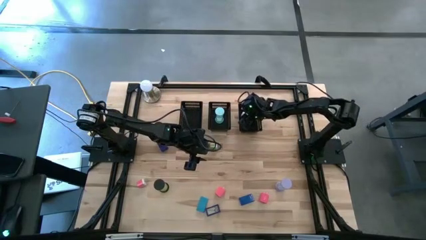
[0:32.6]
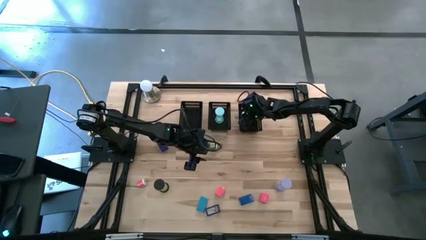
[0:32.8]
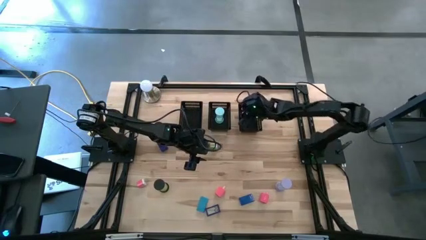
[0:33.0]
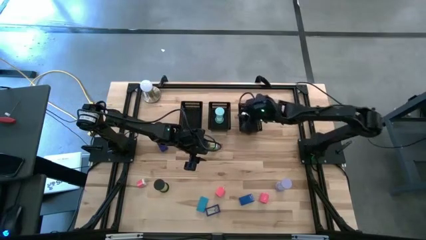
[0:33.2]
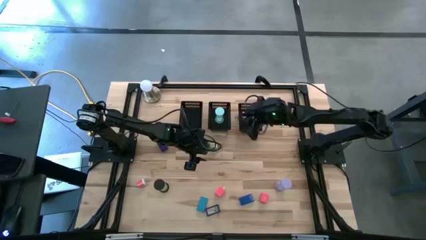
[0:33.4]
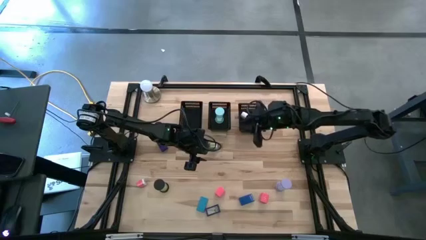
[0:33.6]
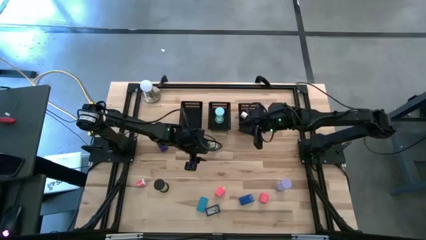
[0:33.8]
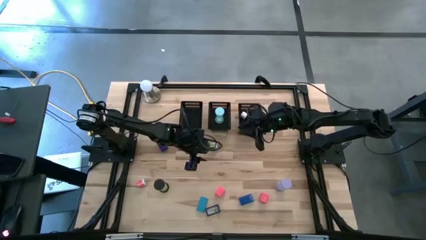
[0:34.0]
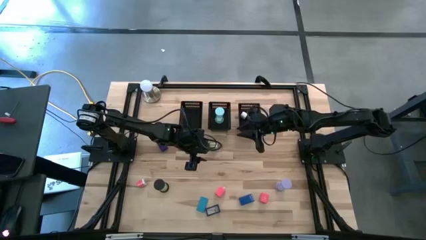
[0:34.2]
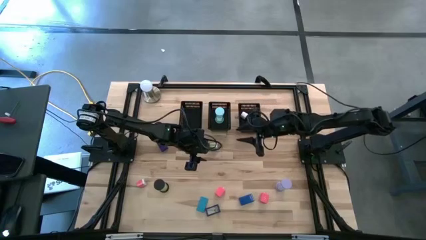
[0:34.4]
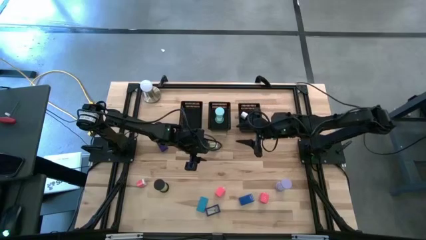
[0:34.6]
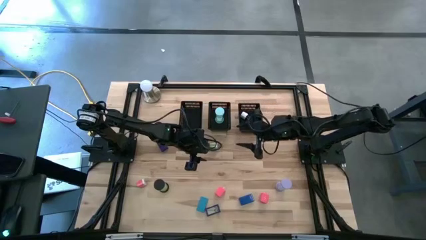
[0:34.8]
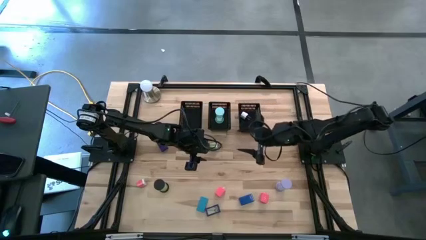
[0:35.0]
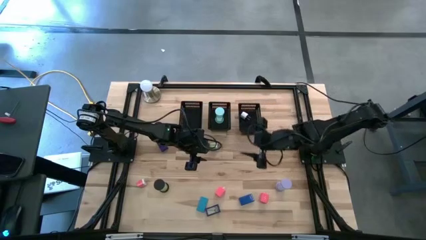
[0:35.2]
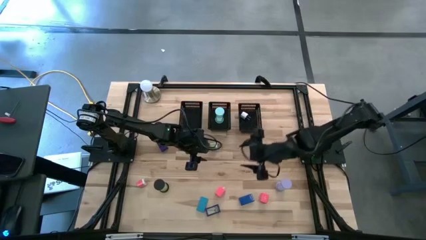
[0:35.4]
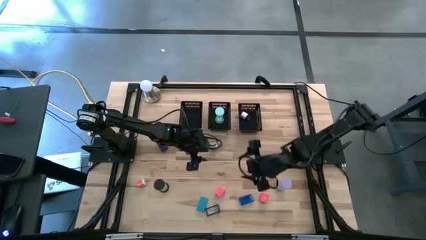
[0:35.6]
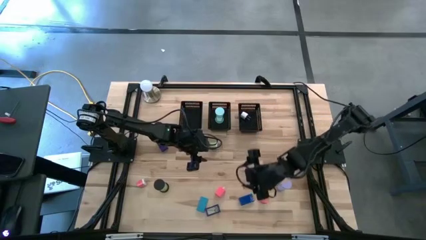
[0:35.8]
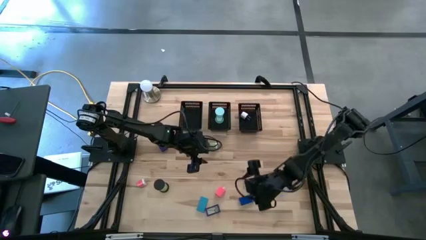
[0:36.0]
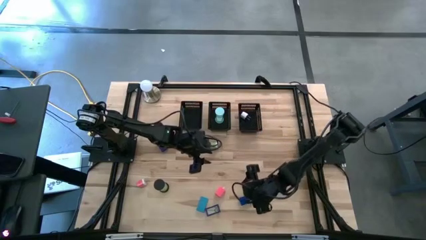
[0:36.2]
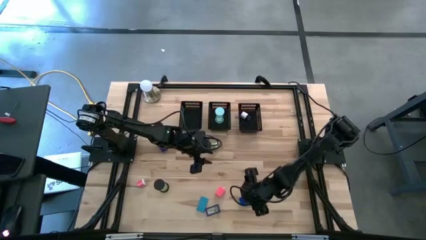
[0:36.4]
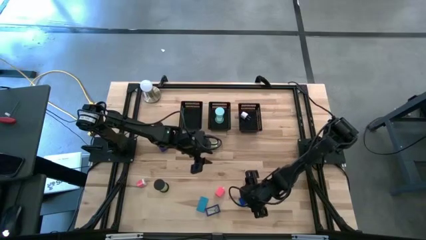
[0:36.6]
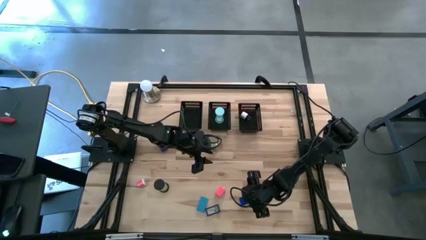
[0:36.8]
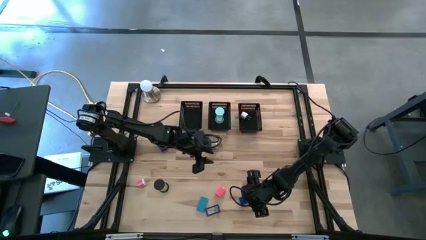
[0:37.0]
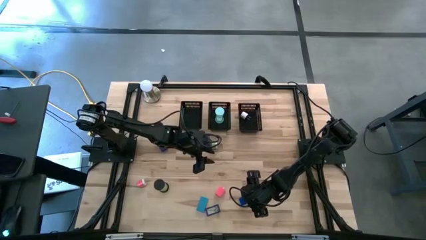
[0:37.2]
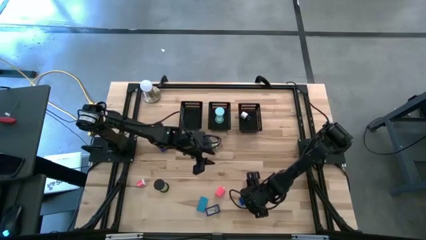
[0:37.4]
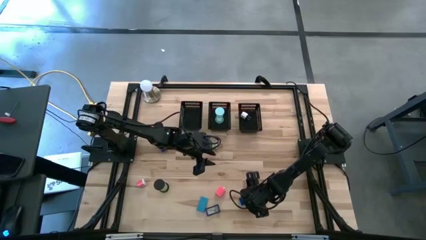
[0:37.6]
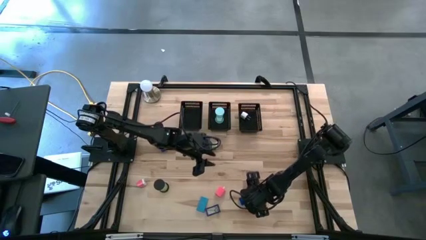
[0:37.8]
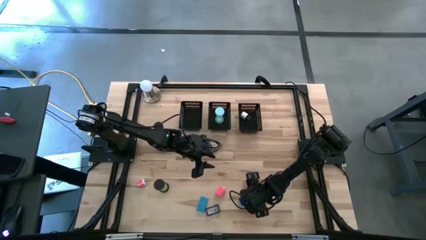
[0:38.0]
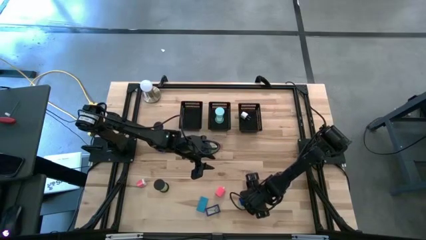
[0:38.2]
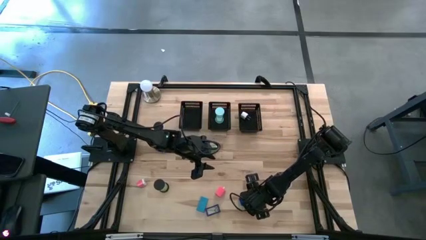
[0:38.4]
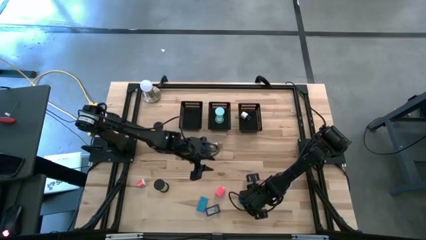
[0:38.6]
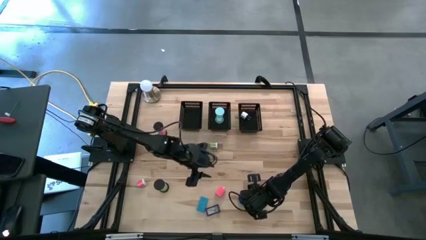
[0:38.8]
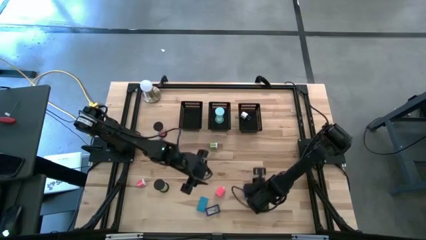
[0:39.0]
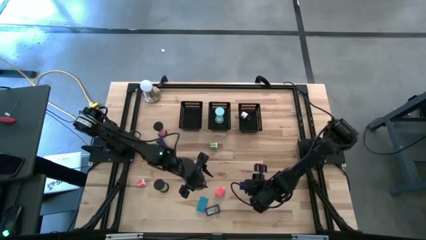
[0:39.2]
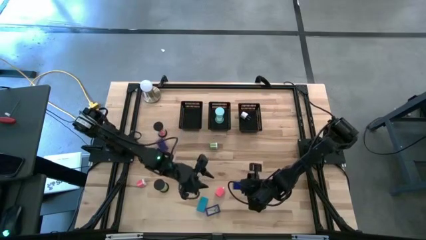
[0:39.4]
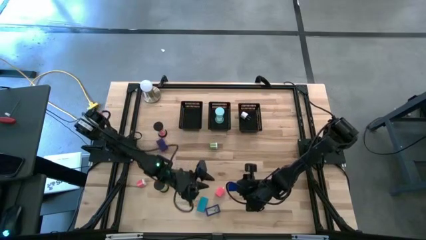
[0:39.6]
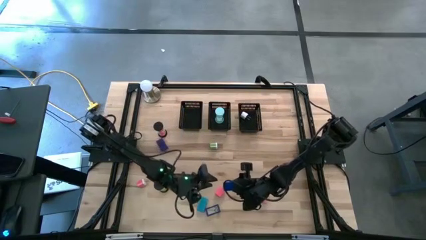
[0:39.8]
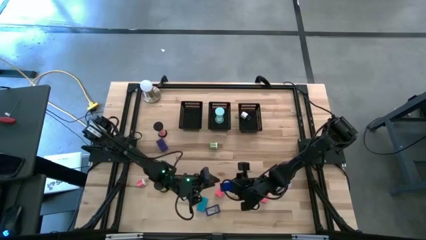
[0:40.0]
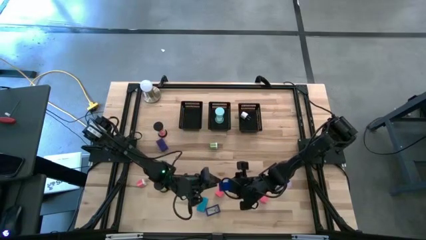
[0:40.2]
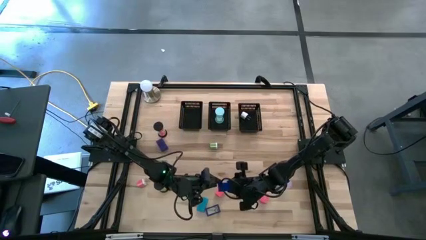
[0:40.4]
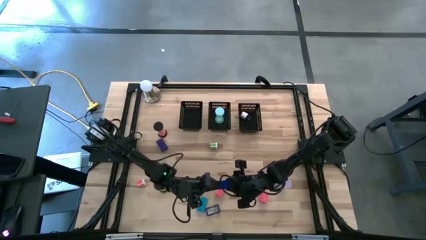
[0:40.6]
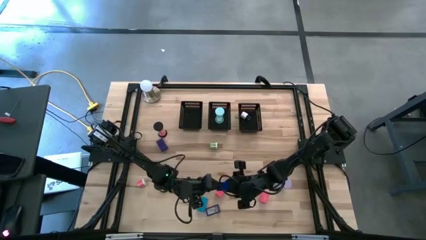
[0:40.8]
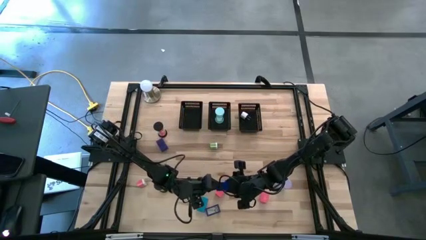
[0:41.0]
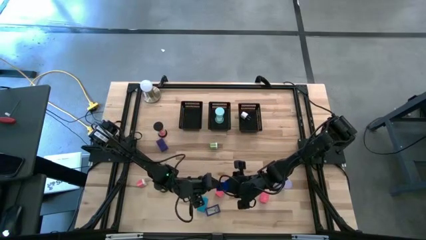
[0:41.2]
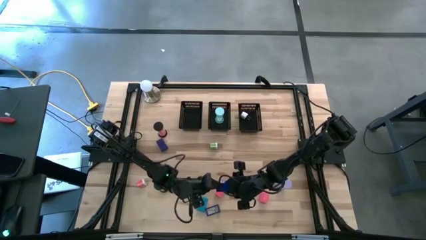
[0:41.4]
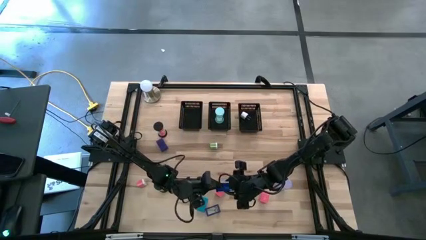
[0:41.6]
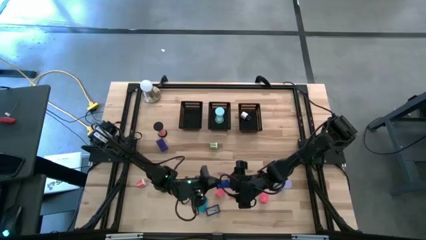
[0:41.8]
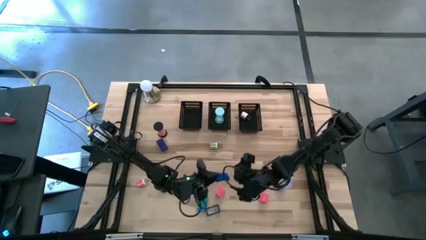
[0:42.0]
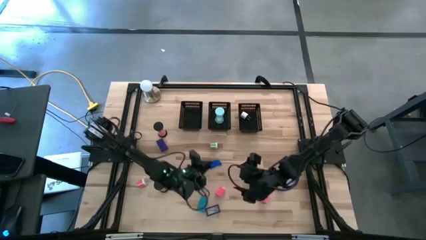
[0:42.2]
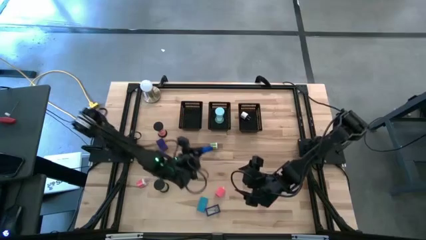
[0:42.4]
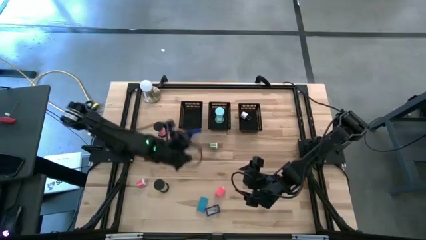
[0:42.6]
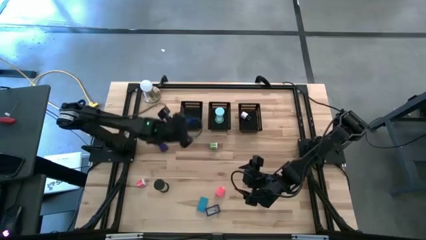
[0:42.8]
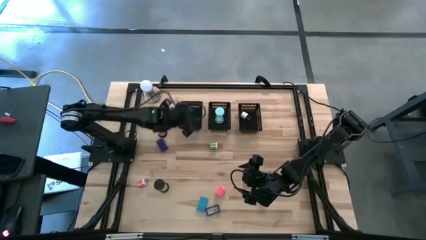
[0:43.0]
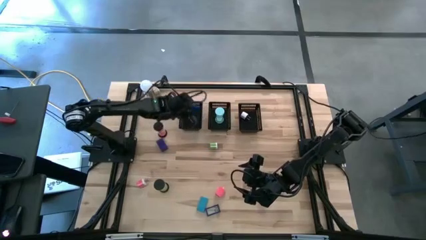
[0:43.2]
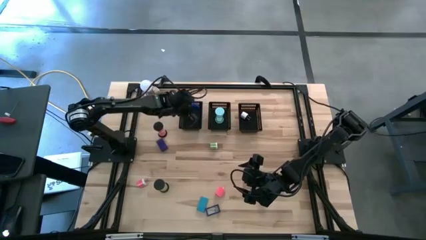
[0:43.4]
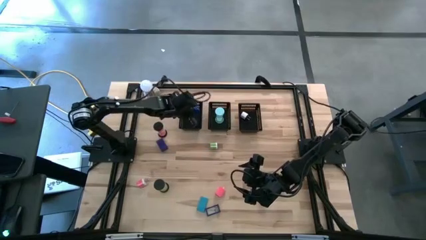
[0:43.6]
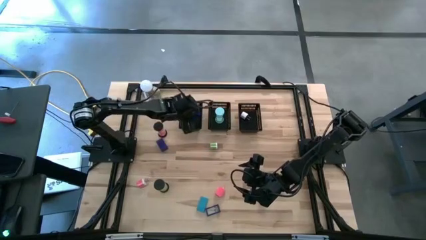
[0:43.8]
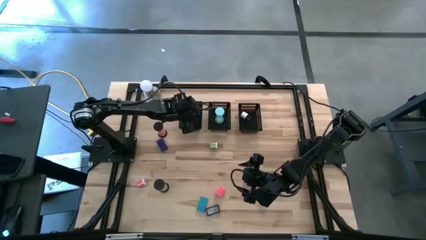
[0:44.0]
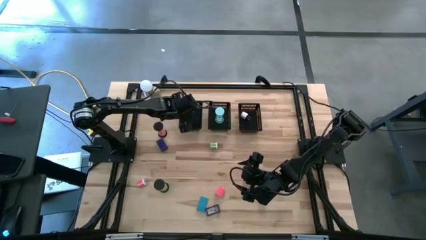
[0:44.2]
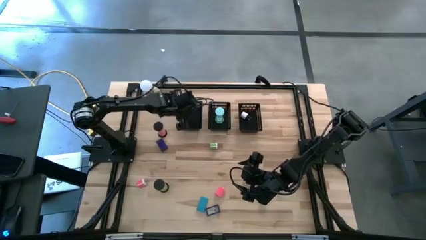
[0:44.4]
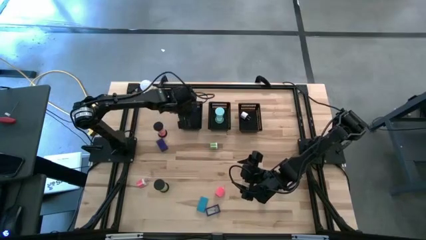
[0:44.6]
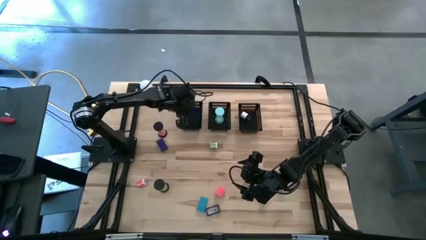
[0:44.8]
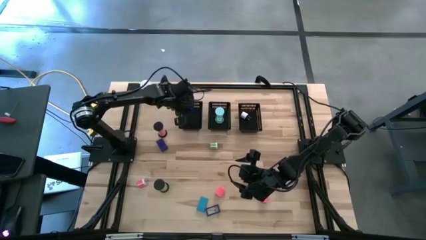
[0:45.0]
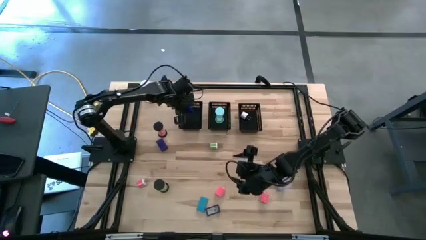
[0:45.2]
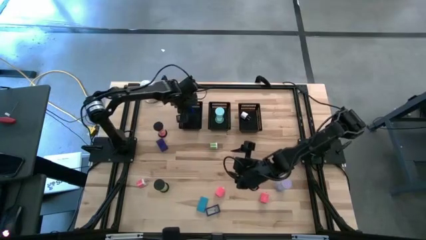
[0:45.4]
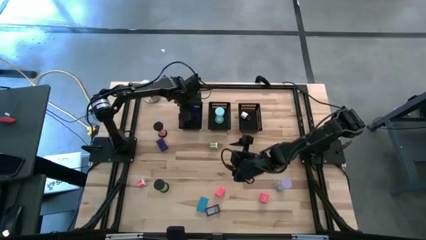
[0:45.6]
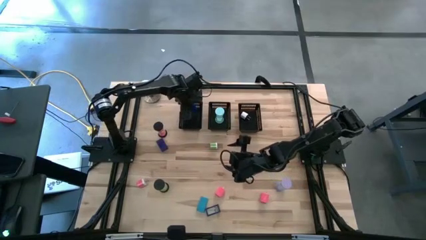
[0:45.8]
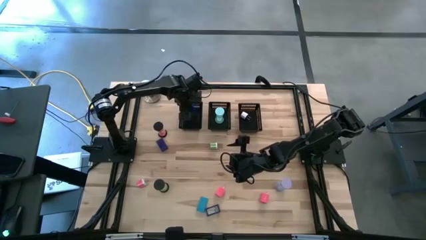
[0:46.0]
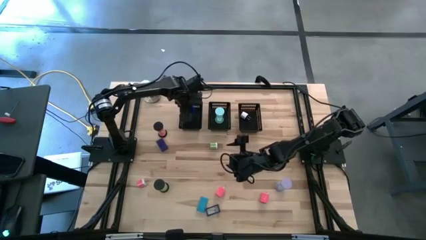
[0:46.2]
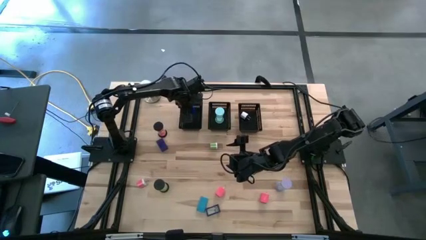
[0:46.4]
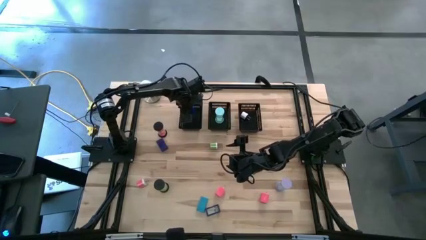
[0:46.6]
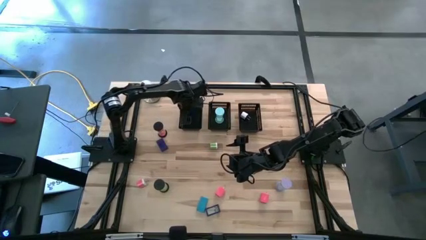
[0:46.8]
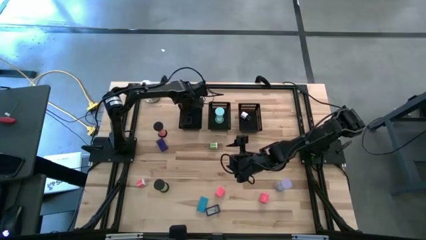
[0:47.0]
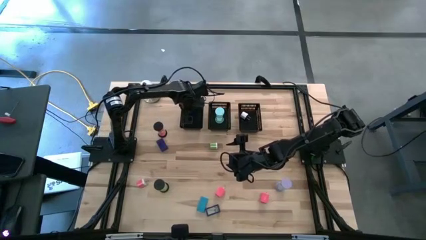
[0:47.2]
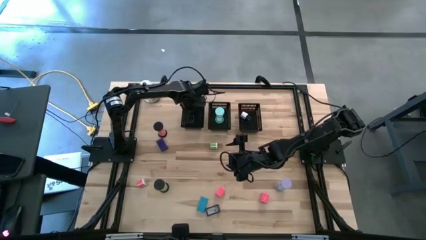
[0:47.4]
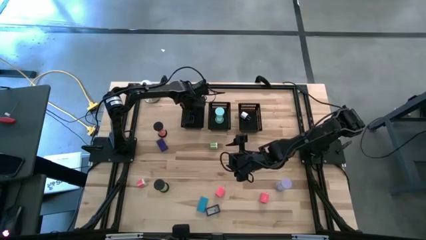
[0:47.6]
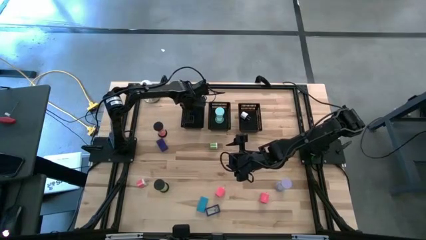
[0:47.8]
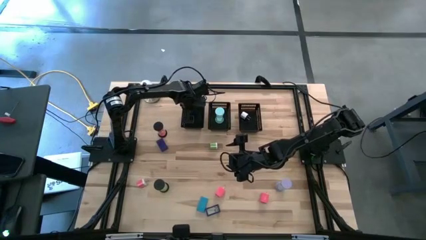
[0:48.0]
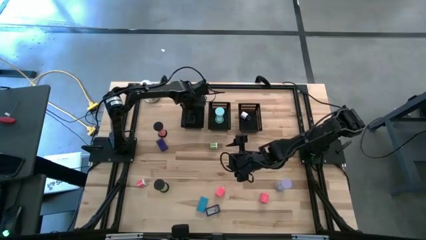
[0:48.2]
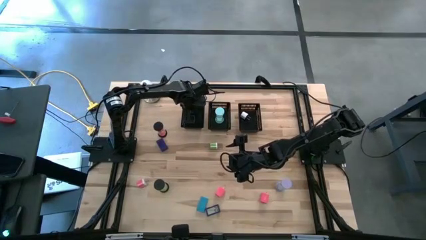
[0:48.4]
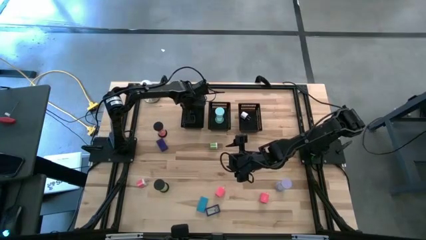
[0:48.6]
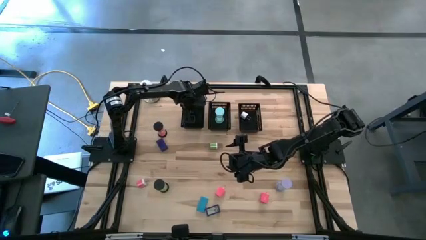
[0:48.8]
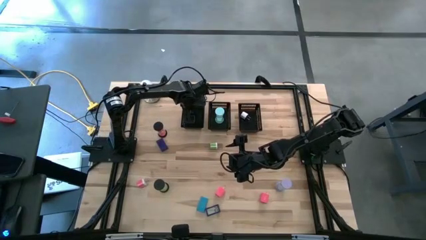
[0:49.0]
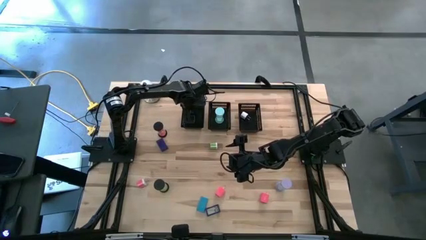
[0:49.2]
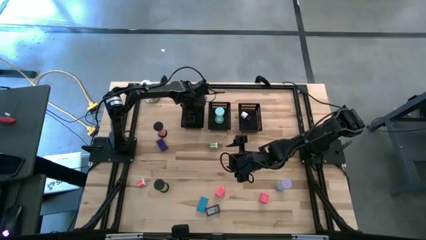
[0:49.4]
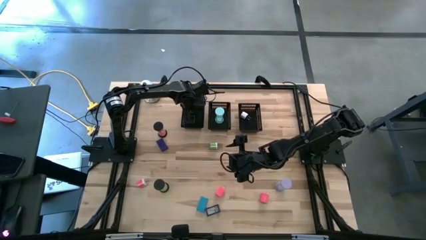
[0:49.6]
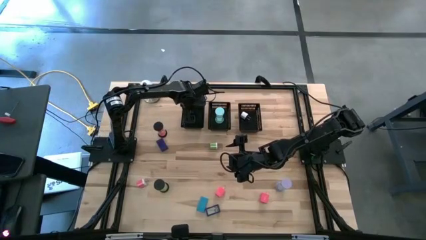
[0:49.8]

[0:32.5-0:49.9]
Task: Pick & Place Office items
Put the right blue digital clock into the left black bin

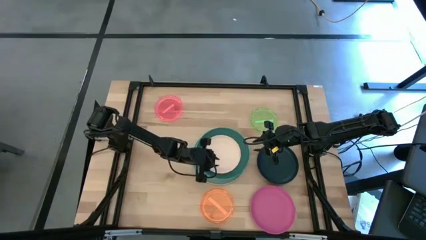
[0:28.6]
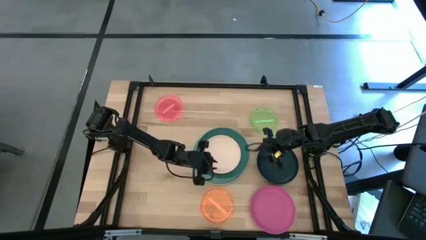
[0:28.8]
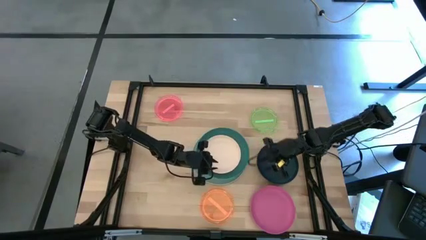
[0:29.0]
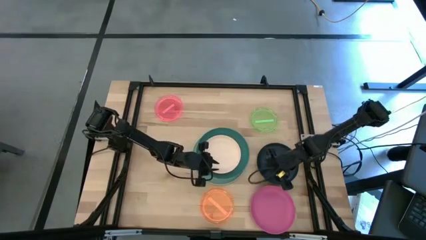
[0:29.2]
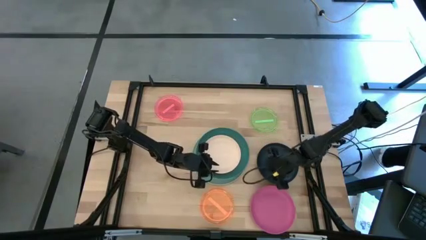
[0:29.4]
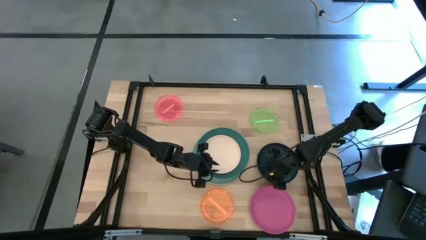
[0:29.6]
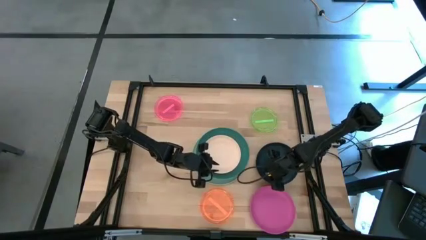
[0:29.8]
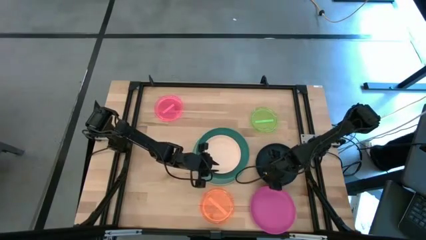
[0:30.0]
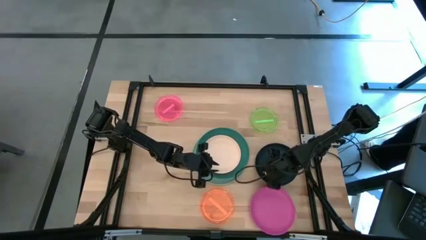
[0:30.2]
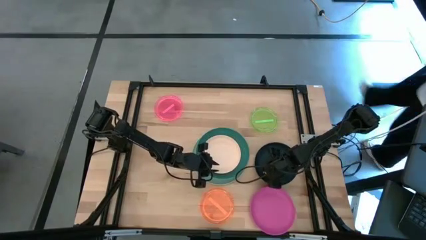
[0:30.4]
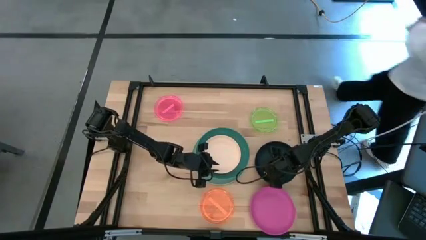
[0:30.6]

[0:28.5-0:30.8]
Task: Stack plastic plates
Stack the black plate on top of the white plate
